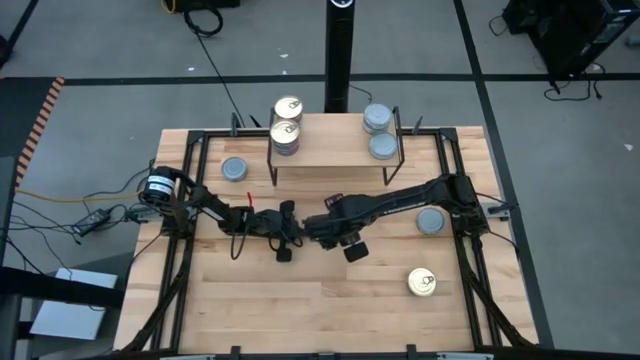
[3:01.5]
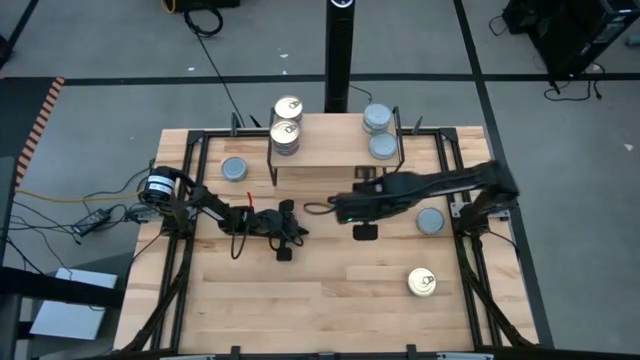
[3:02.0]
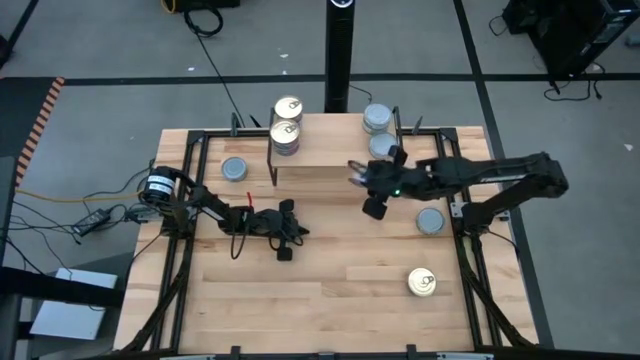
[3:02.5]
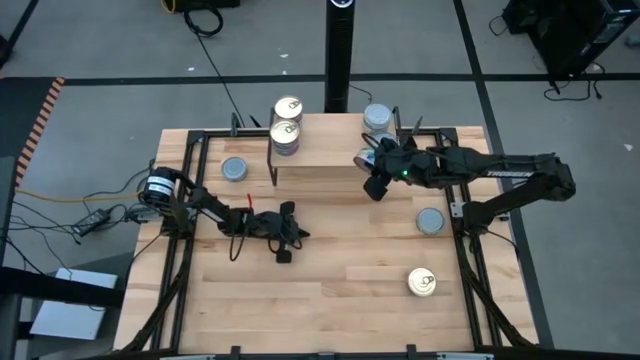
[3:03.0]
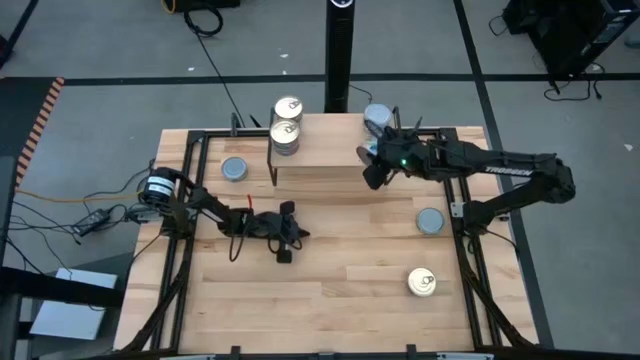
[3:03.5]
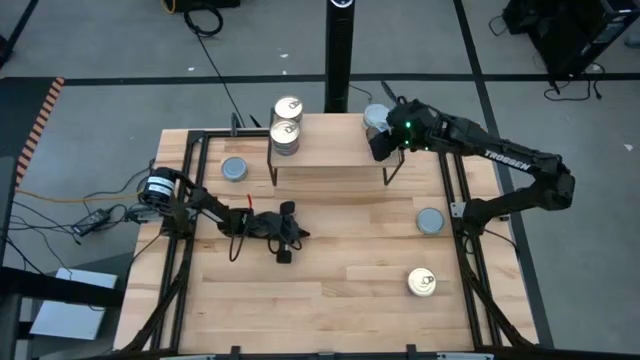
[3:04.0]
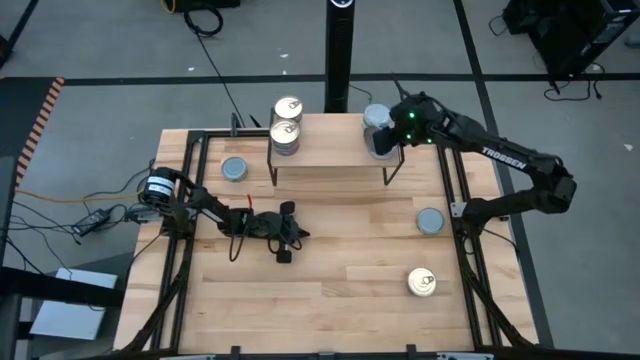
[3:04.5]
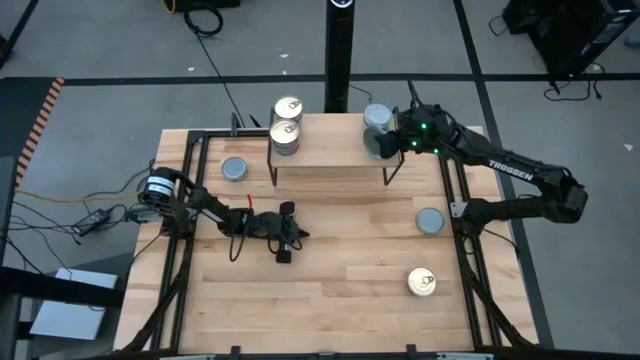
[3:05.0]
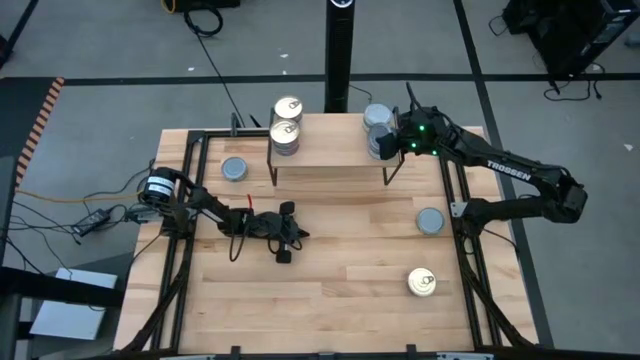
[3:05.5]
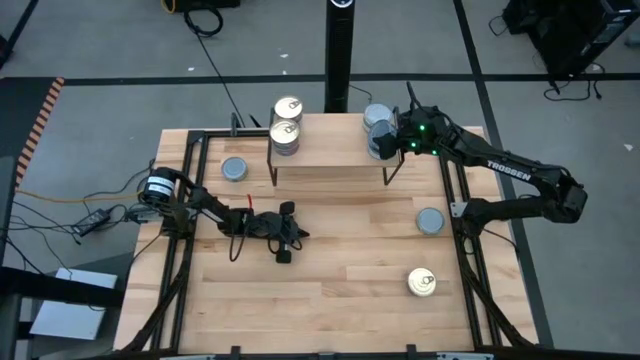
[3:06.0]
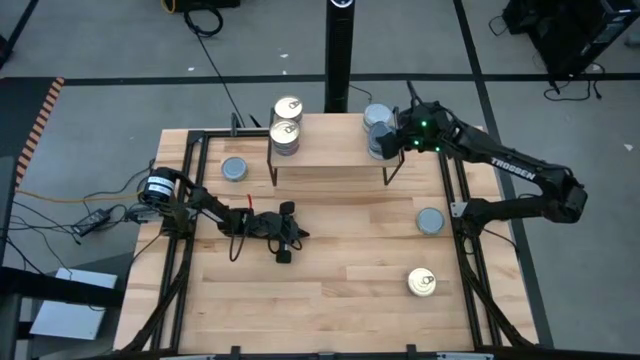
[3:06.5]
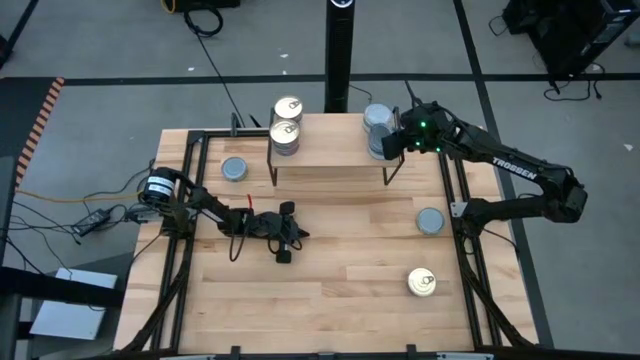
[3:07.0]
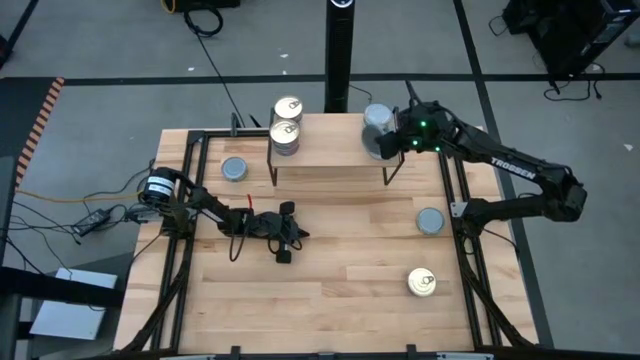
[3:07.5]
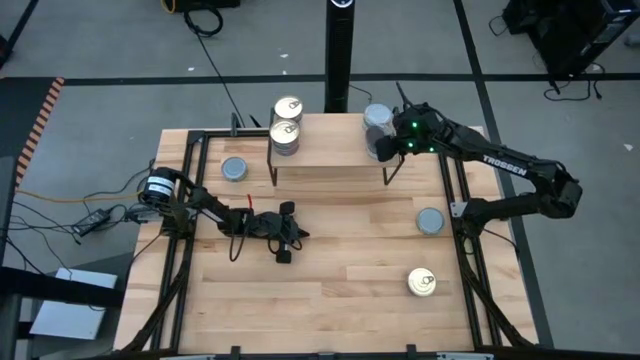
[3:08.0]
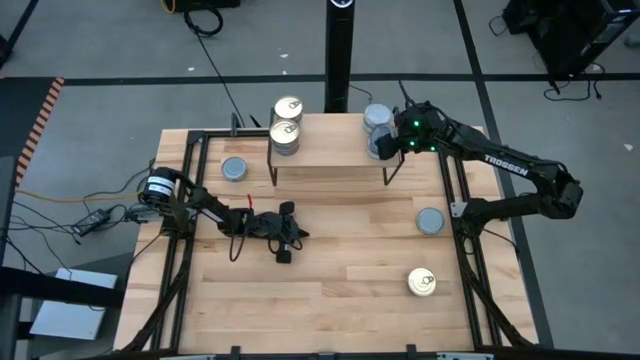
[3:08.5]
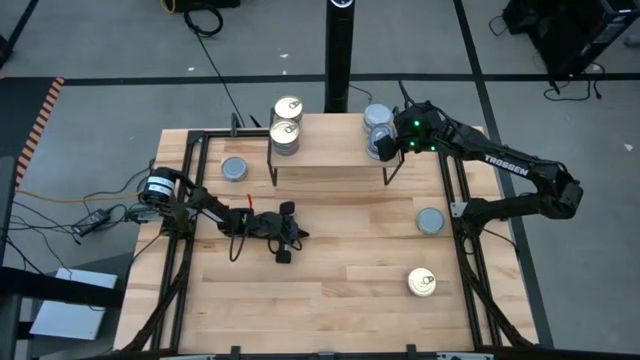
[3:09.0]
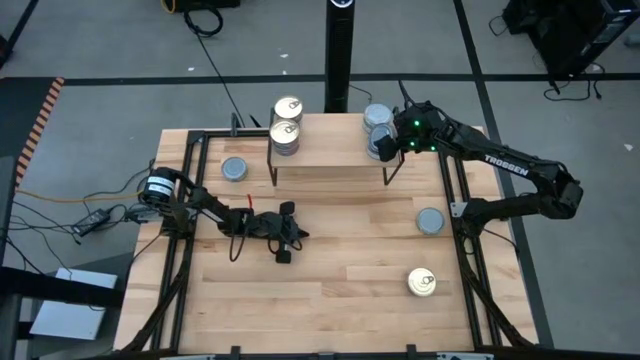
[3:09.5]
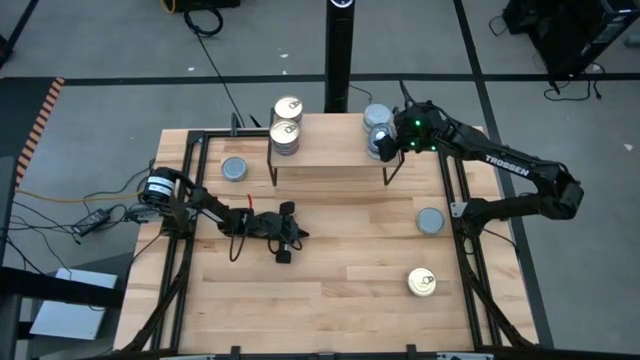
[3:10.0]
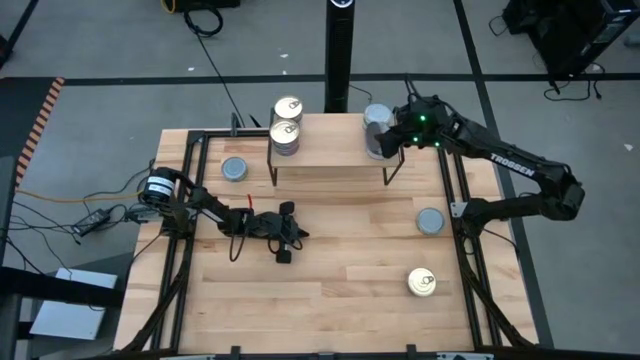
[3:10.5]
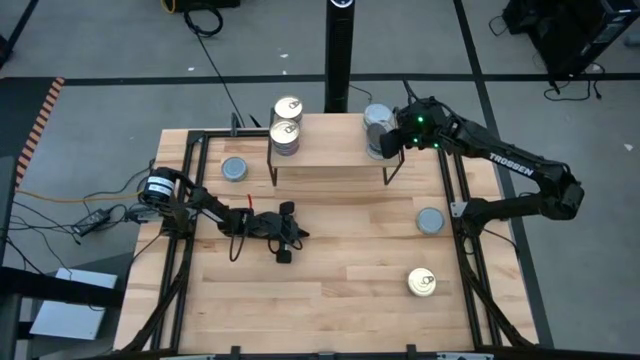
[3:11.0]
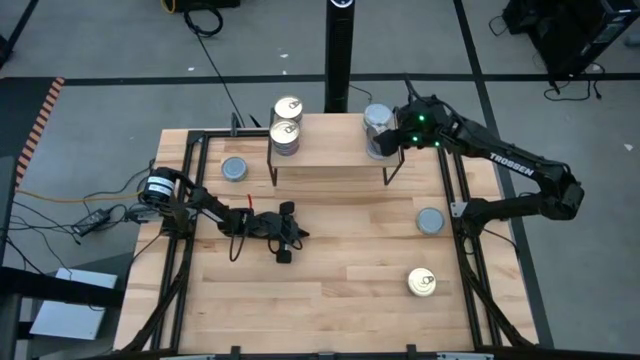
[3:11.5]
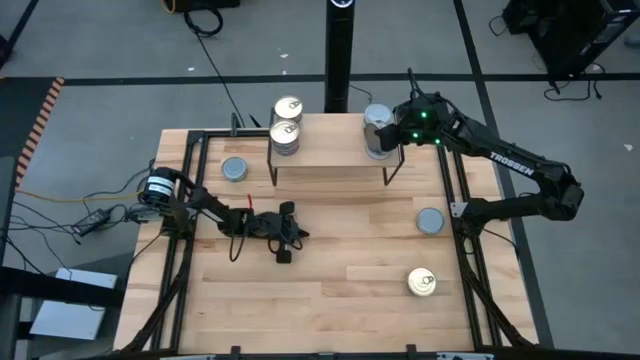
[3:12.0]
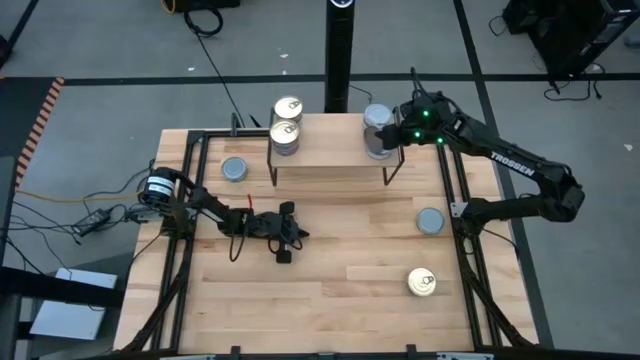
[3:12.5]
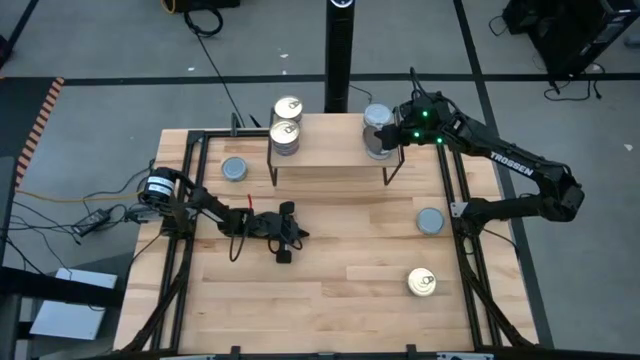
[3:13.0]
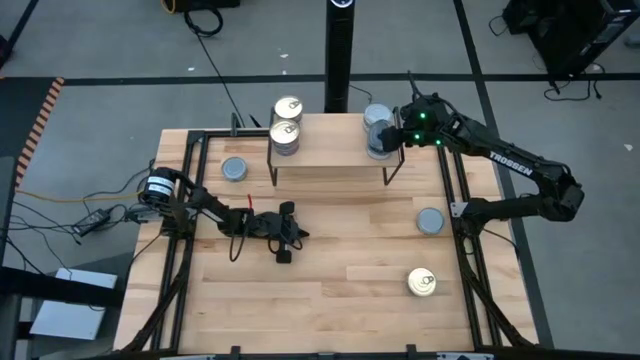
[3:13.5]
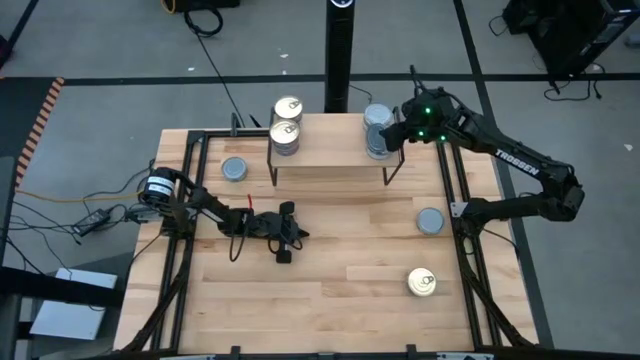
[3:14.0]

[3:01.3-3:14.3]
Task: Stack canned seafood by type on shelf
Stack the green tuna can on the bottom green tuna can on the shelf

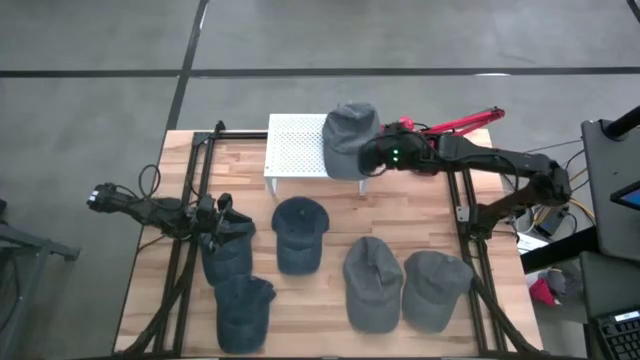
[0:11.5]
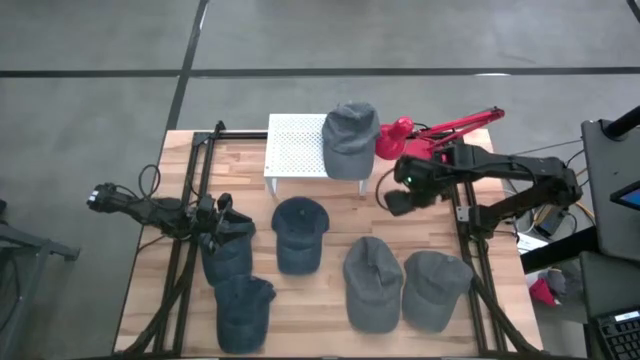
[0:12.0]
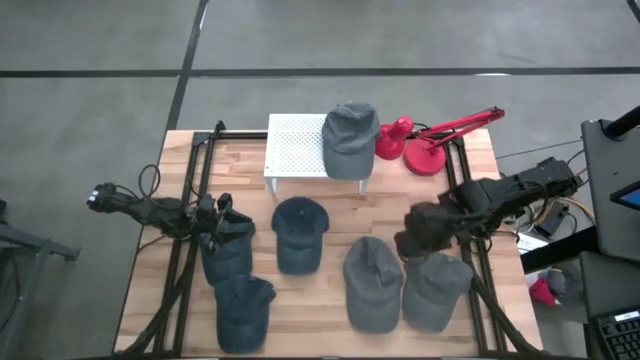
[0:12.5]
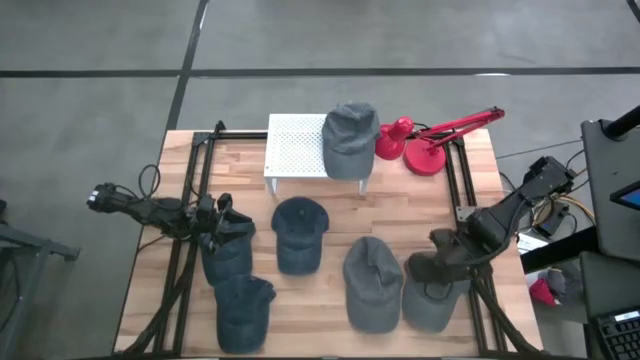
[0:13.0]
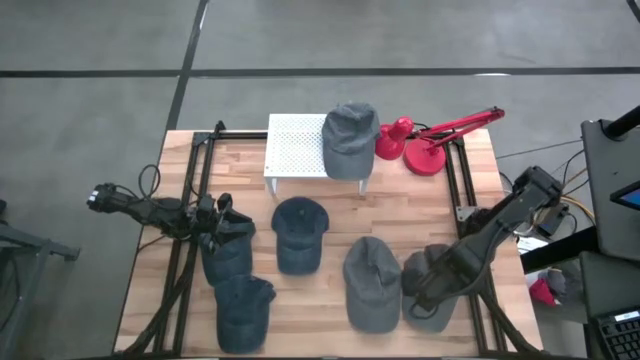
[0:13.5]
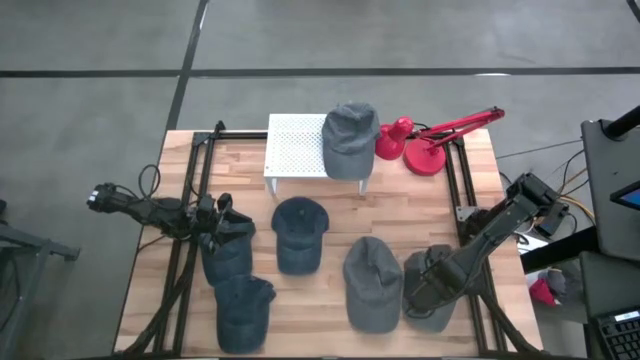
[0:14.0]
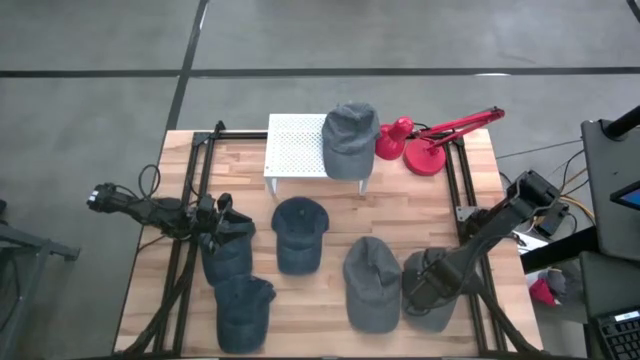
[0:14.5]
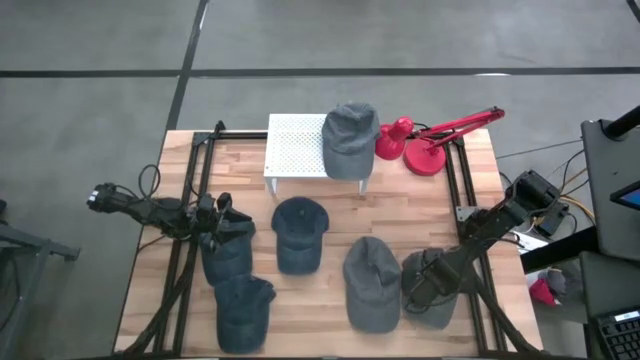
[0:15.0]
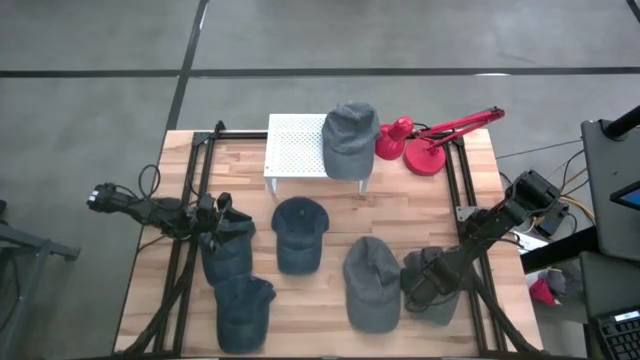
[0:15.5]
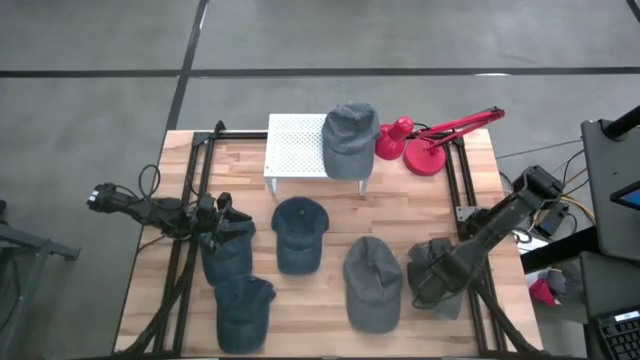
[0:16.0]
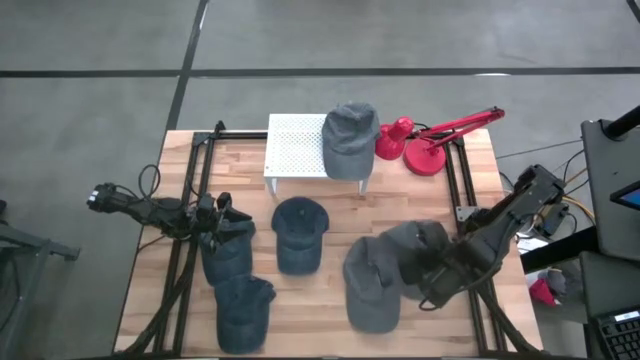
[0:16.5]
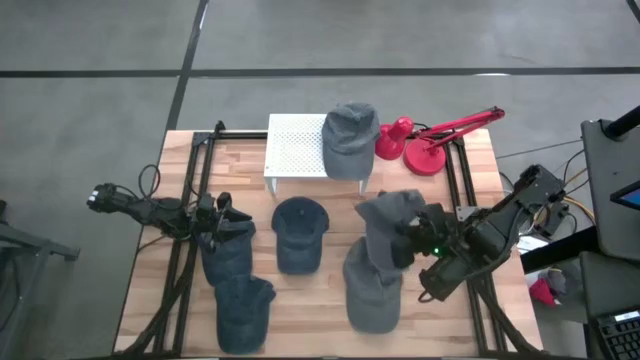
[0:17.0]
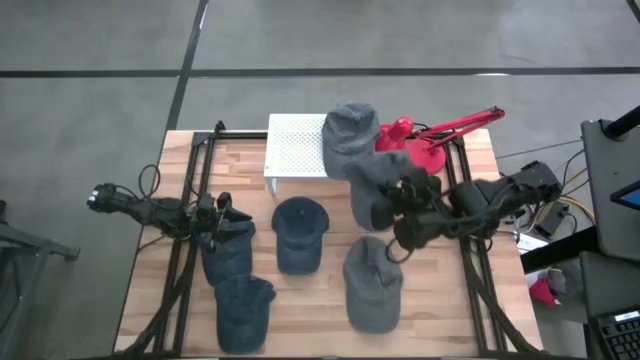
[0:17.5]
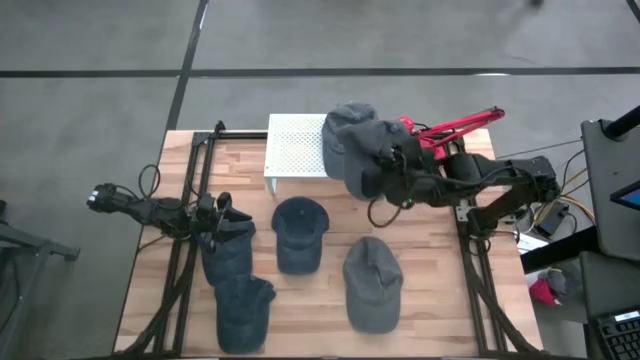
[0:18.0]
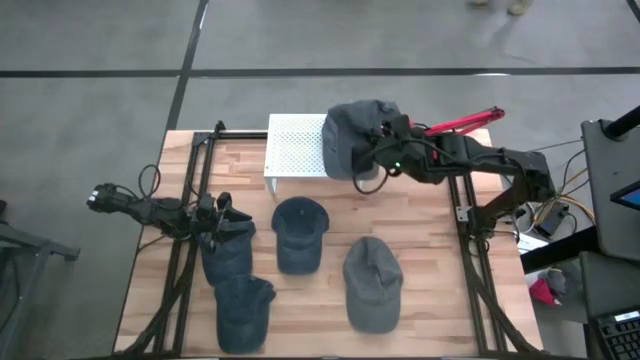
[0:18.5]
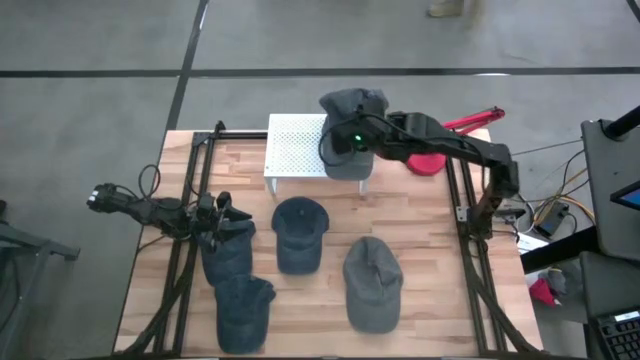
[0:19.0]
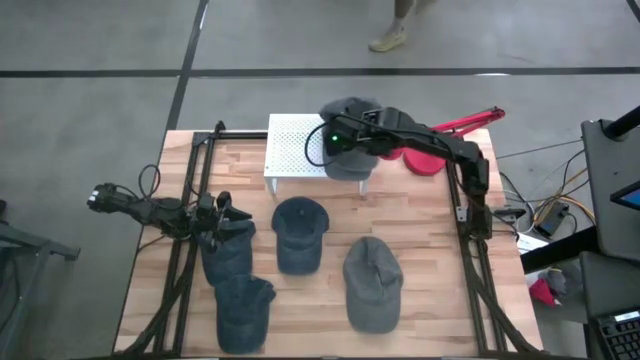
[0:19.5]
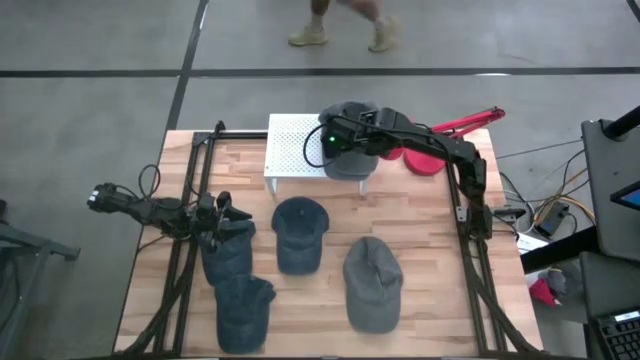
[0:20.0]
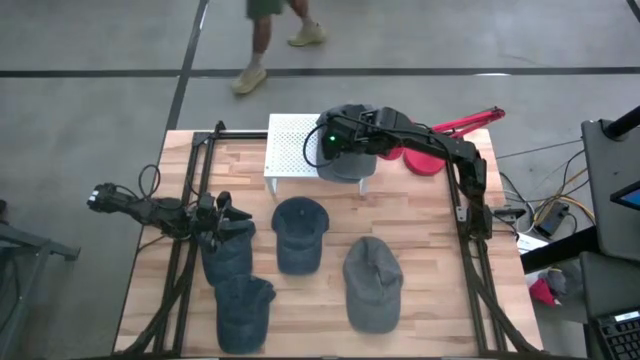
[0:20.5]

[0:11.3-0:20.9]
Task: Pick & Place hat
Put the gray cap on top of the gray cap on the shelf
